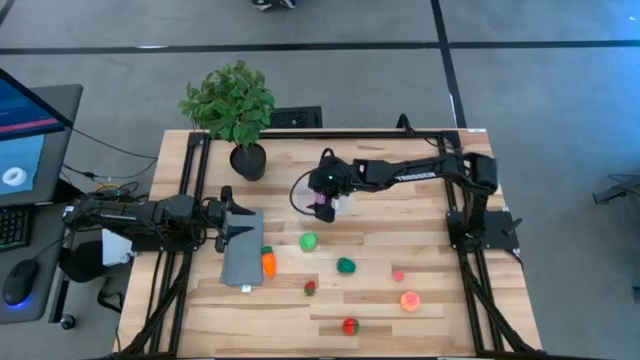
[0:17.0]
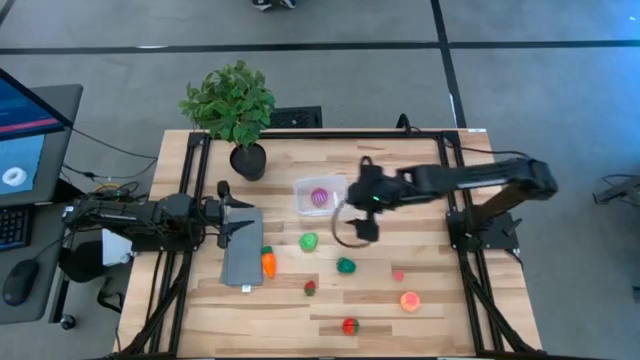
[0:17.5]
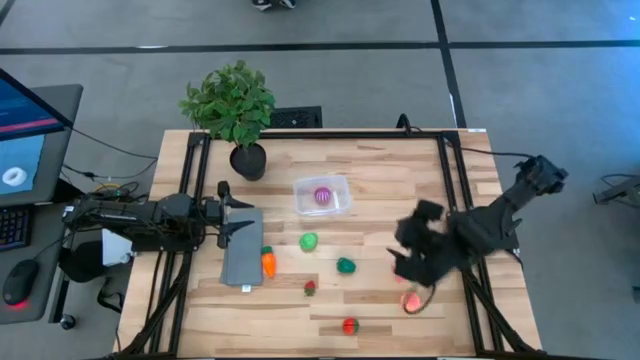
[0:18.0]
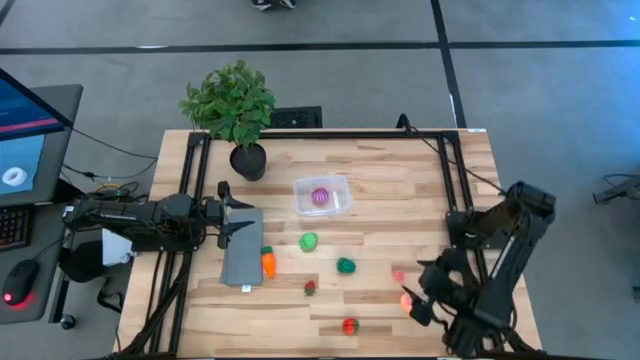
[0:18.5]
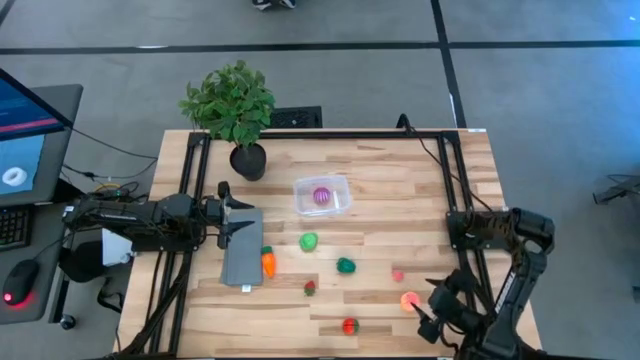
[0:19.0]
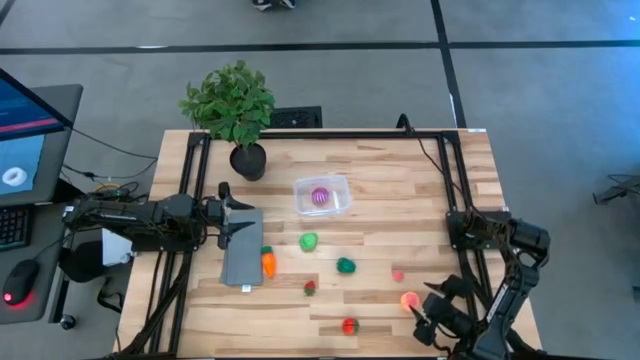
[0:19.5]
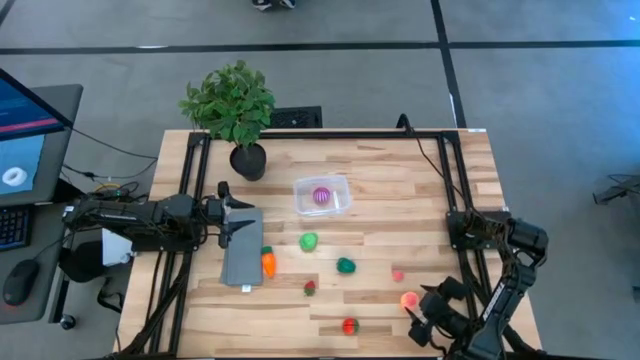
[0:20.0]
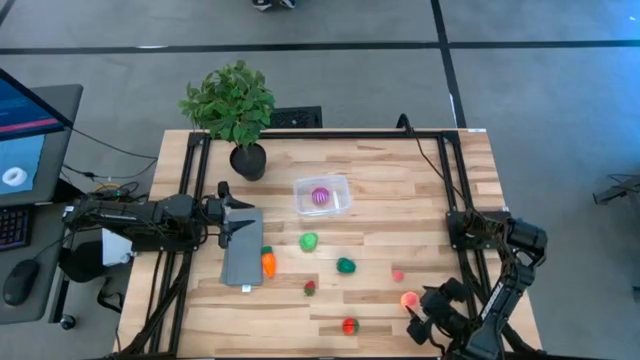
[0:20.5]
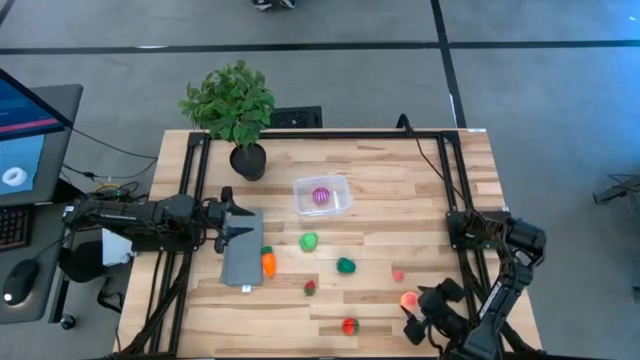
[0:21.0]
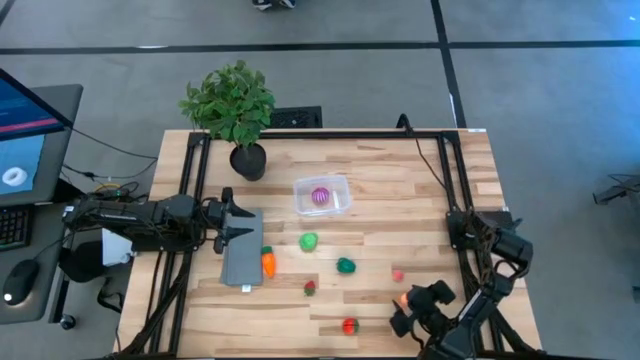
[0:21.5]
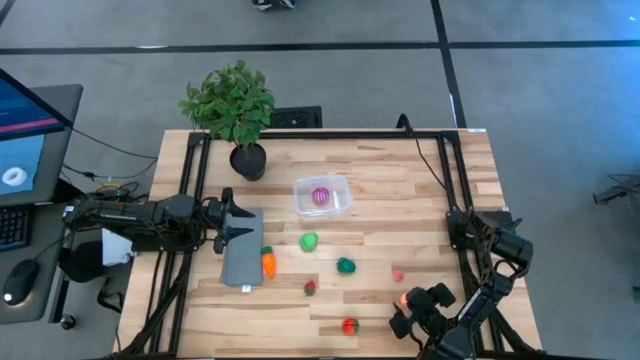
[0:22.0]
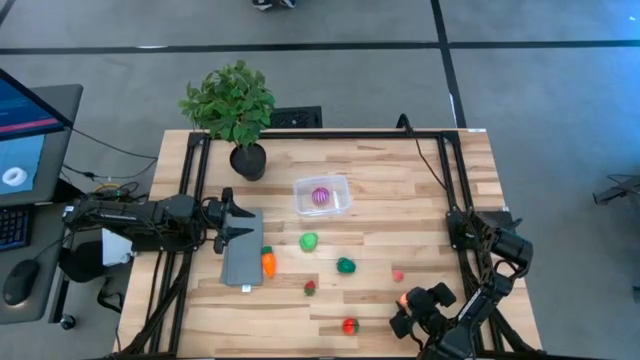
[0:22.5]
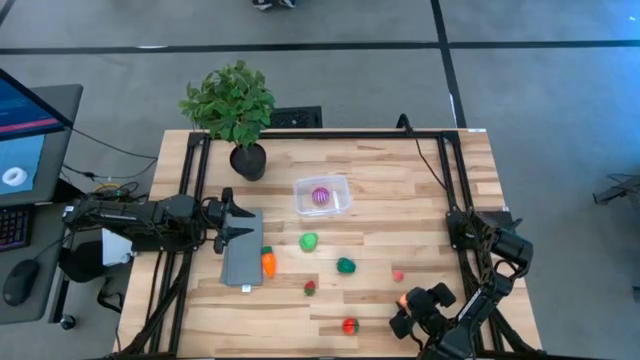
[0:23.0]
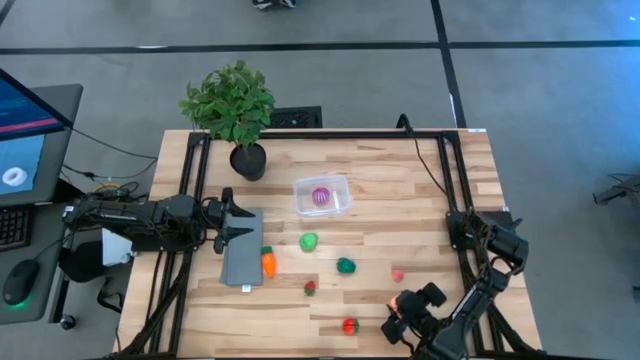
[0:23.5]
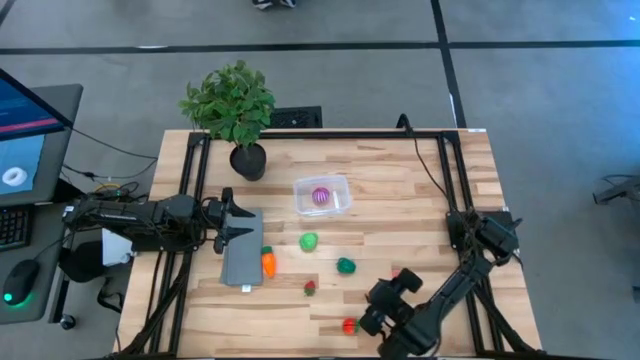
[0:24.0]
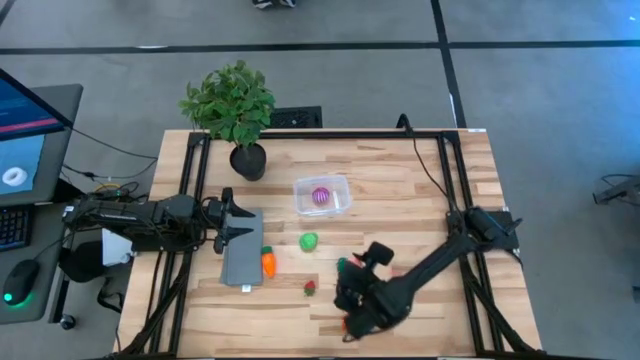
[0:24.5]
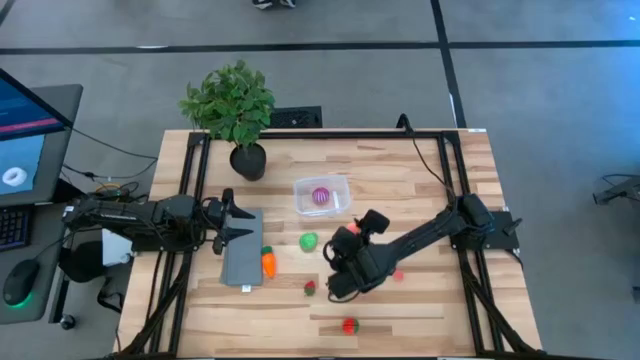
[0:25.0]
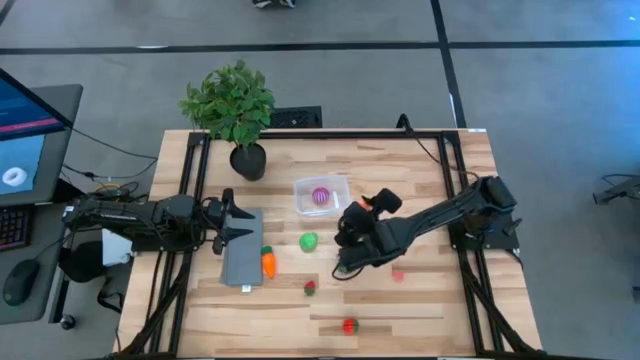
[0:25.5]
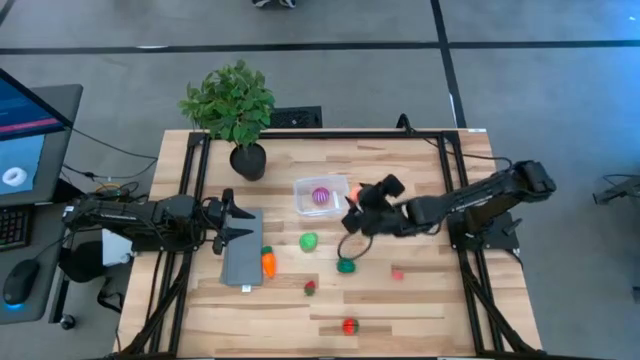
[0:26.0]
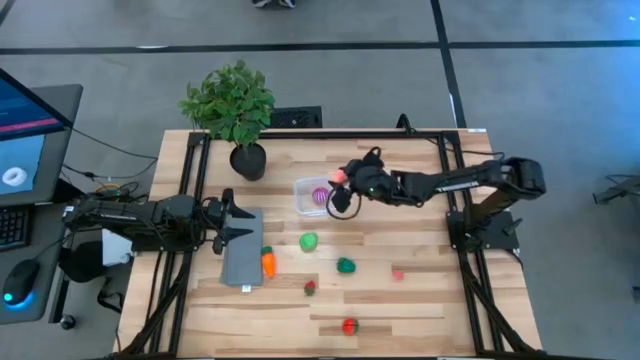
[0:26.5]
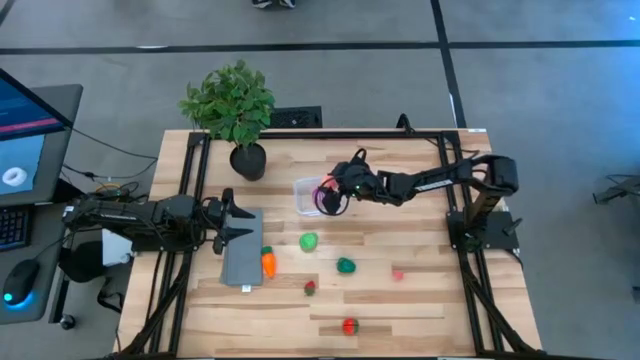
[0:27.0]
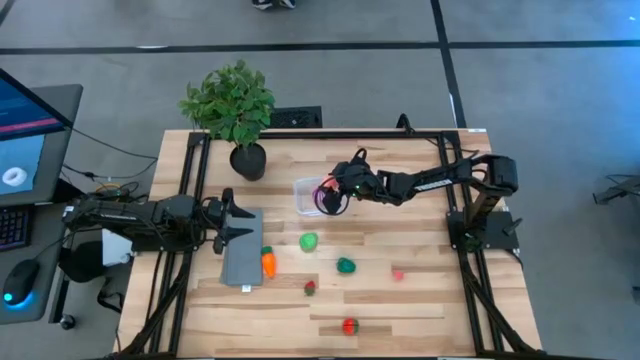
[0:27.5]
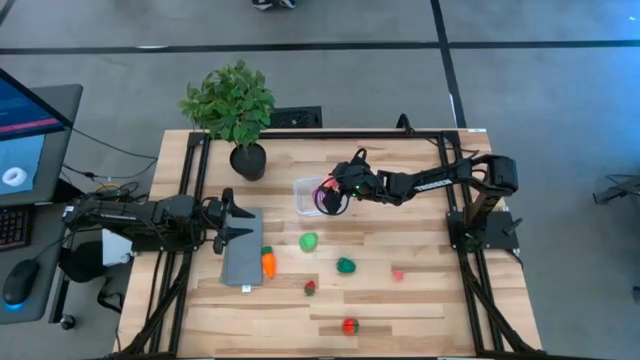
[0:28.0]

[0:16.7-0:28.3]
Task: Pick and placing Produce into tupperware
Put the big peach into the transparent container

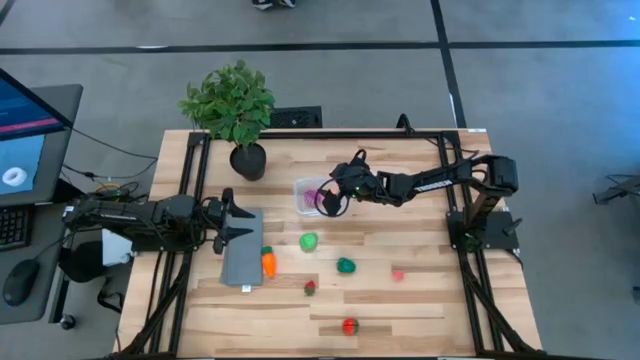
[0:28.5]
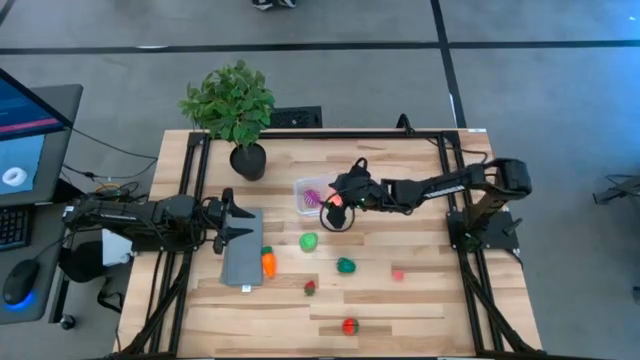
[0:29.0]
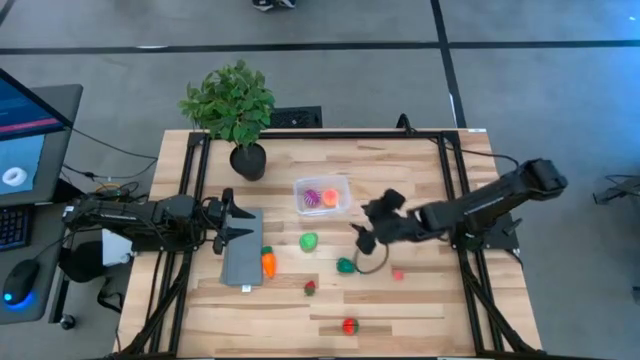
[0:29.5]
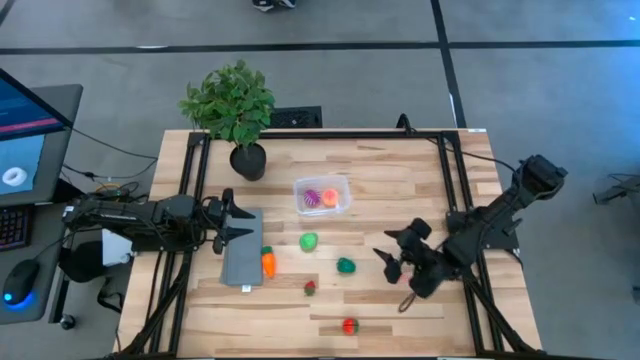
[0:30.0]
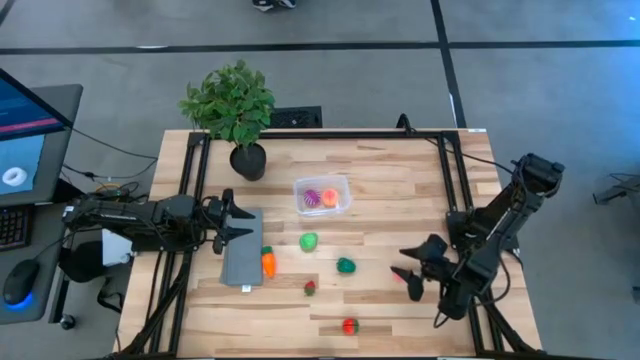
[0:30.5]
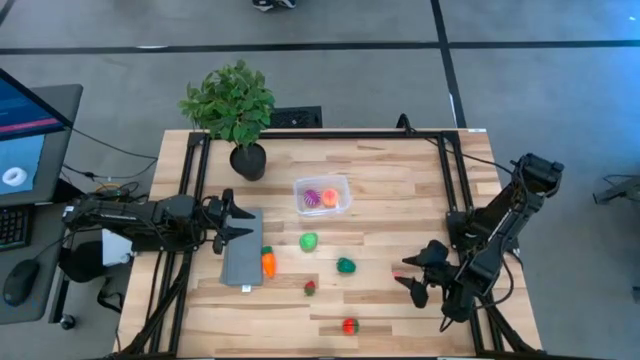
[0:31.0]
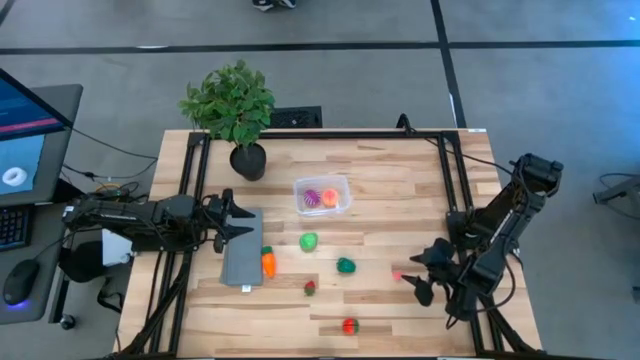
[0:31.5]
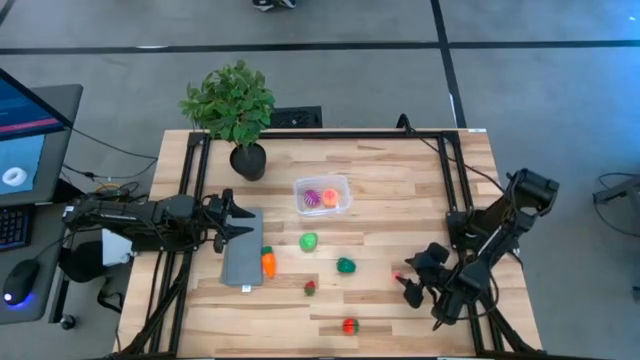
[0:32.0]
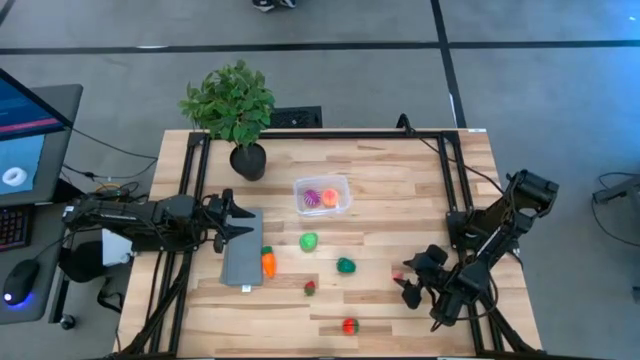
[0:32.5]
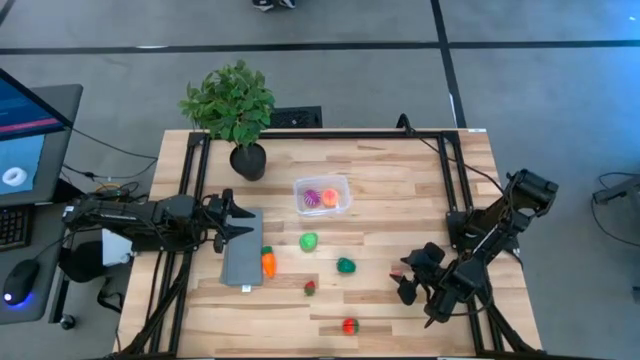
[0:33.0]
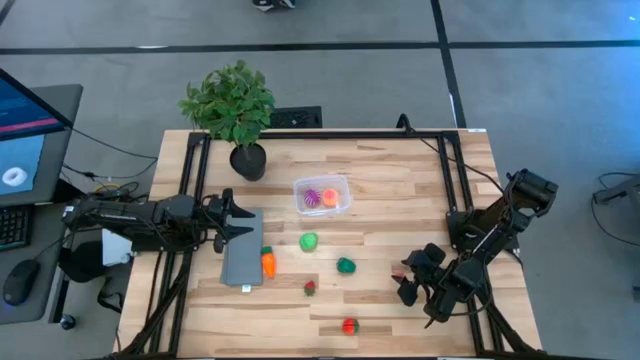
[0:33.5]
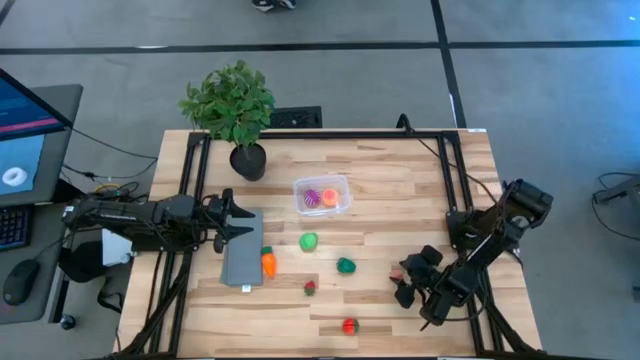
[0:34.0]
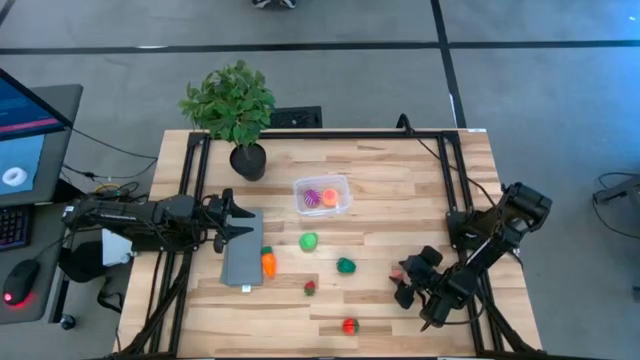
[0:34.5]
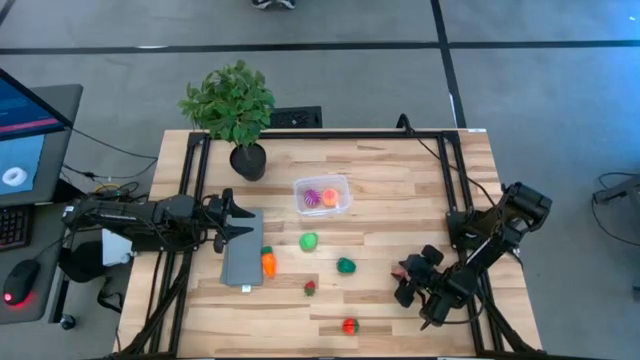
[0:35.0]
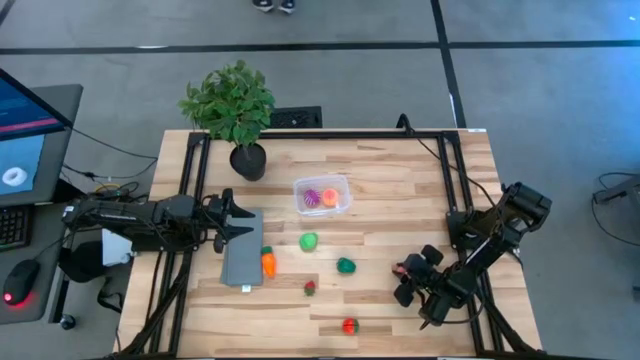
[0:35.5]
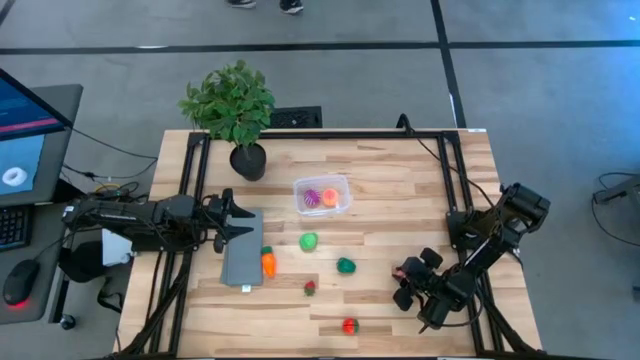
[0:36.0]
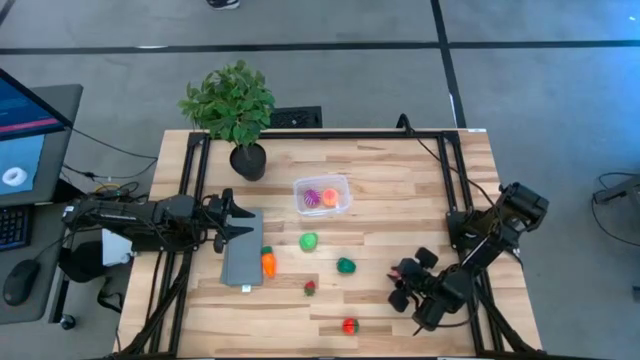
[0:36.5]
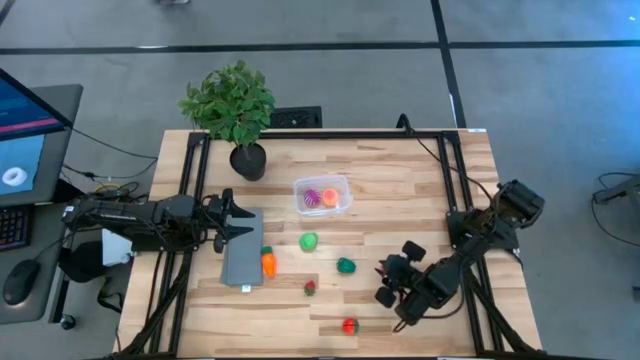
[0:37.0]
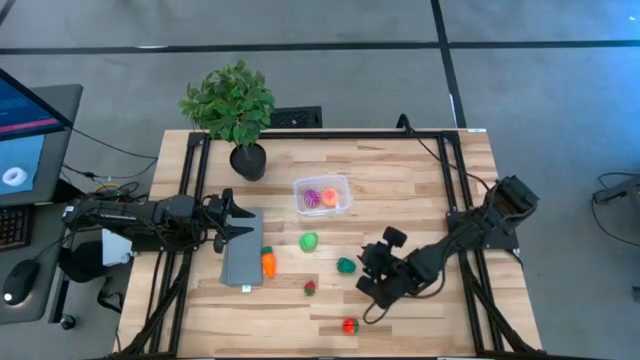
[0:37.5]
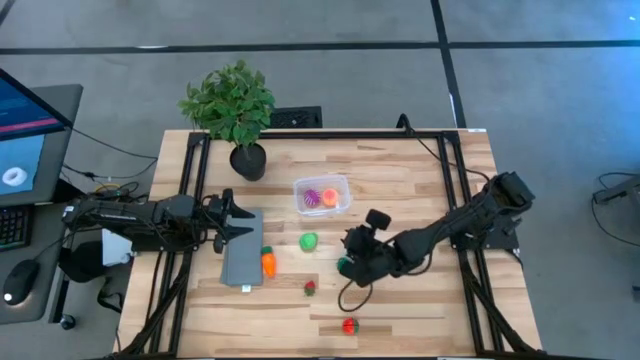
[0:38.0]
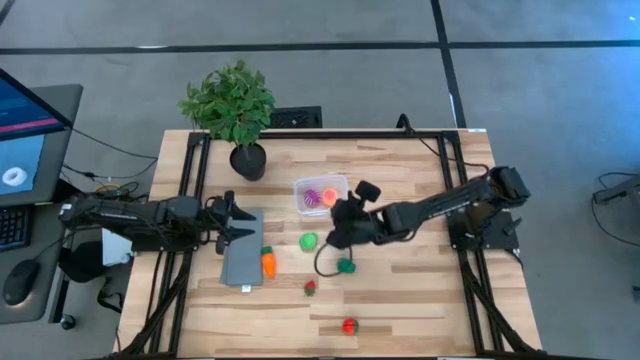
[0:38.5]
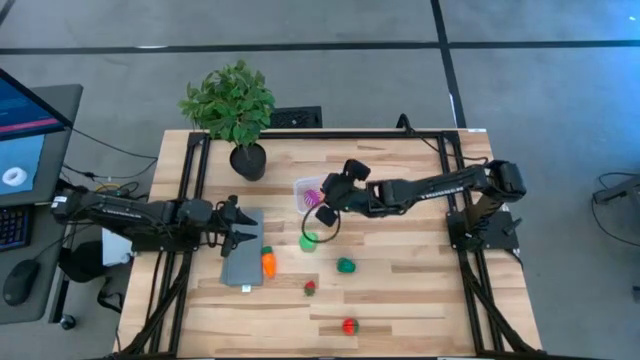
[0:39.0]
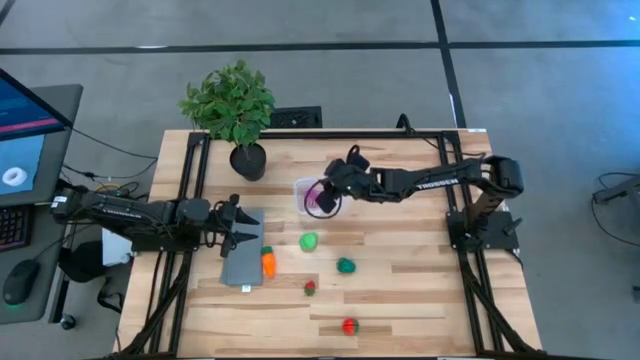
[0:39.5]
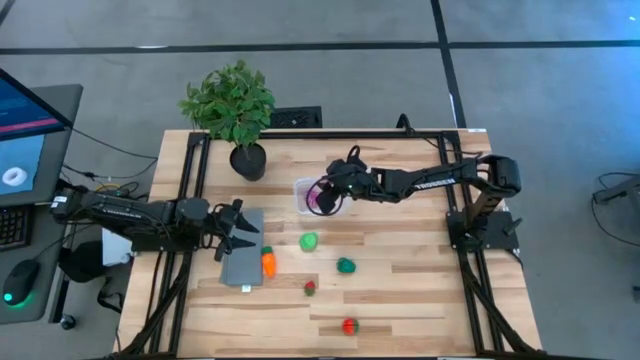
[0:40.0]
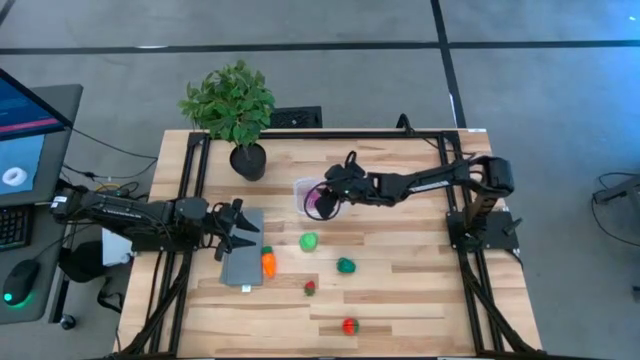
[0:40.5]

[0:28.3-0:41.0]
Put the small peach into the transparent container
